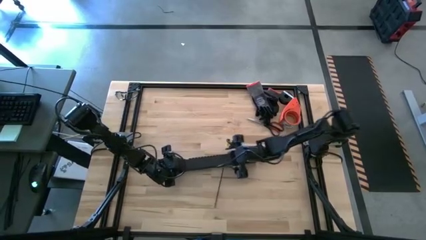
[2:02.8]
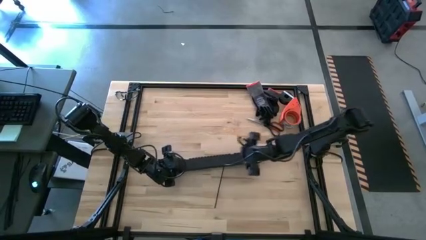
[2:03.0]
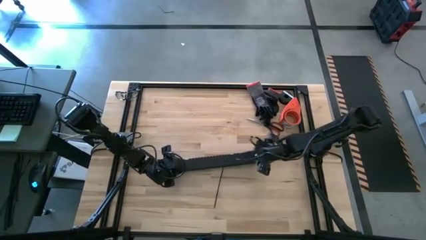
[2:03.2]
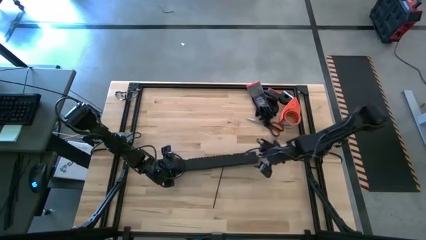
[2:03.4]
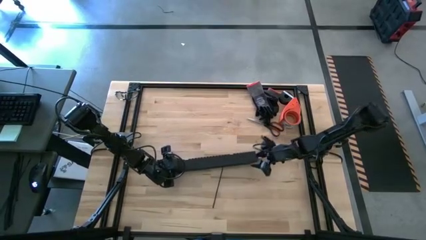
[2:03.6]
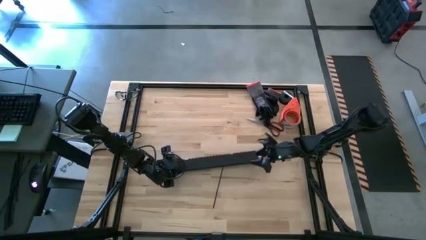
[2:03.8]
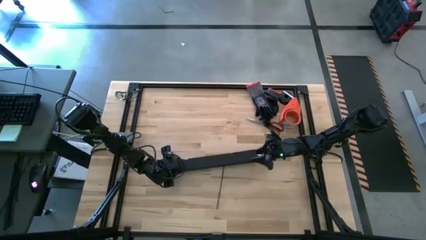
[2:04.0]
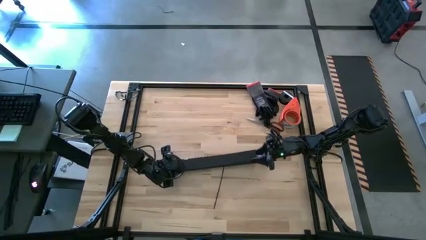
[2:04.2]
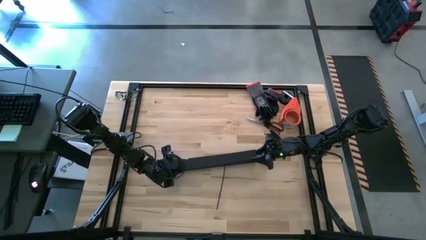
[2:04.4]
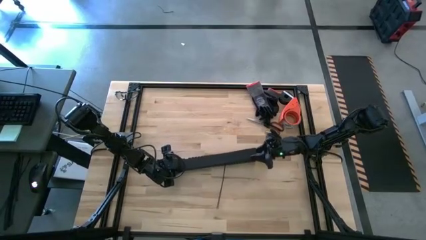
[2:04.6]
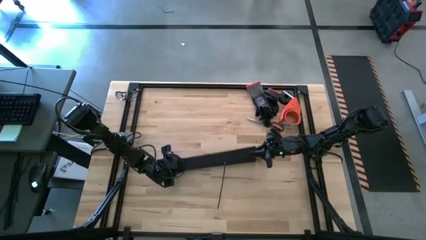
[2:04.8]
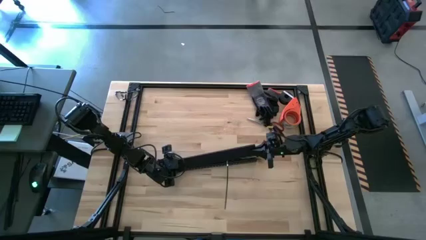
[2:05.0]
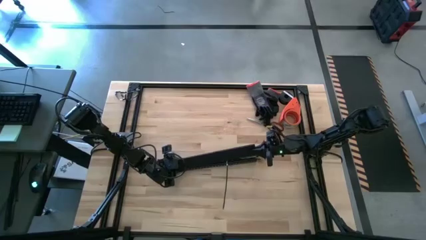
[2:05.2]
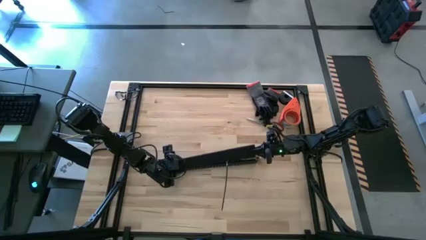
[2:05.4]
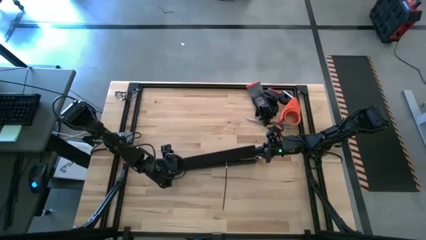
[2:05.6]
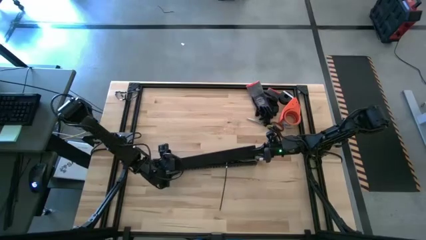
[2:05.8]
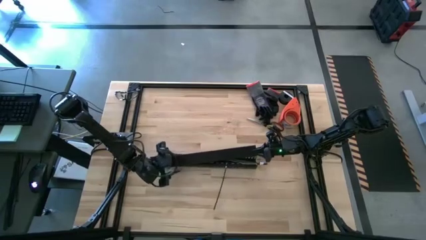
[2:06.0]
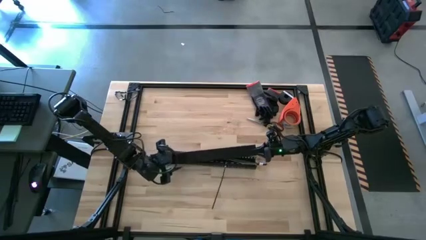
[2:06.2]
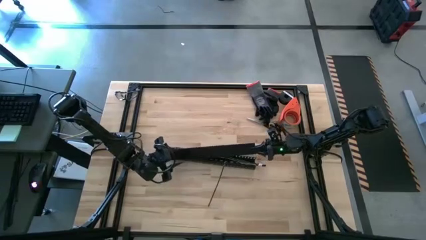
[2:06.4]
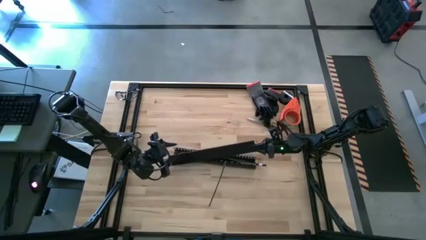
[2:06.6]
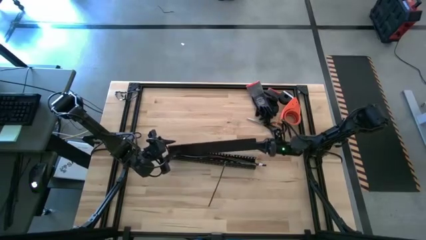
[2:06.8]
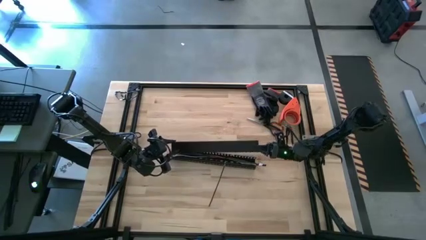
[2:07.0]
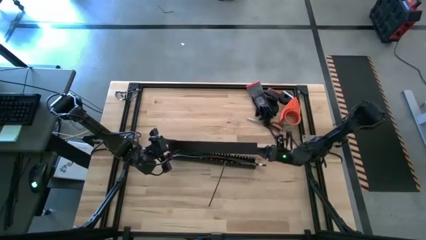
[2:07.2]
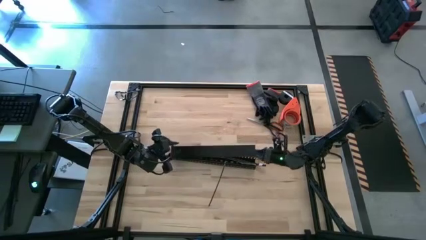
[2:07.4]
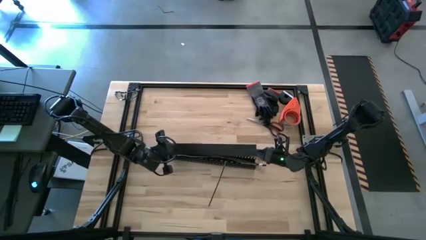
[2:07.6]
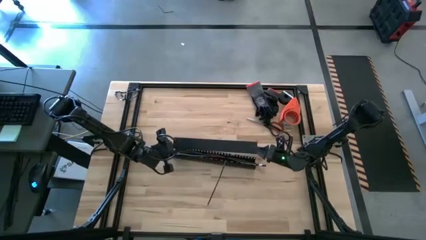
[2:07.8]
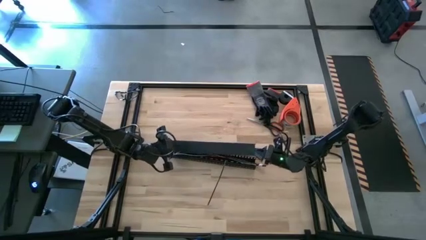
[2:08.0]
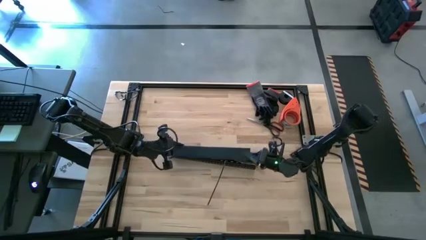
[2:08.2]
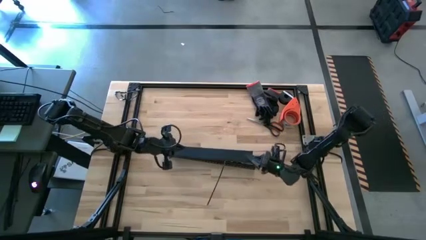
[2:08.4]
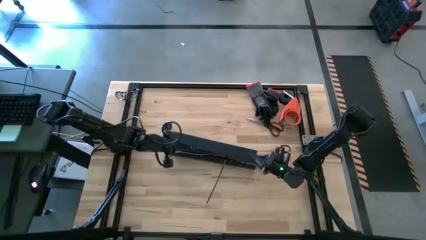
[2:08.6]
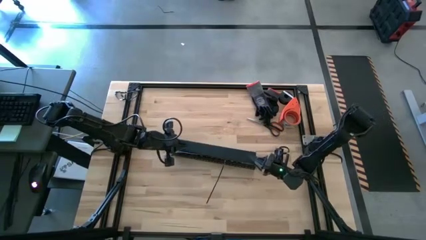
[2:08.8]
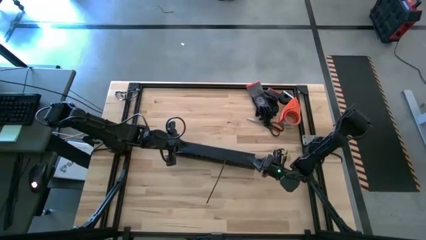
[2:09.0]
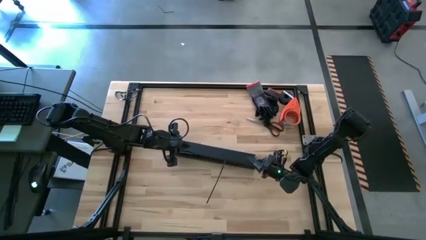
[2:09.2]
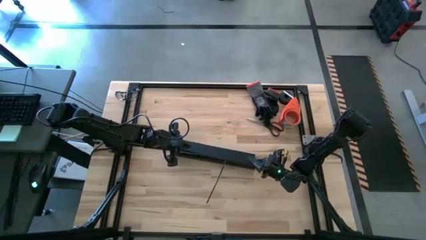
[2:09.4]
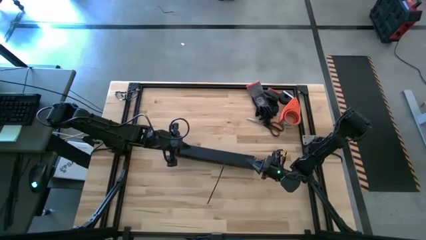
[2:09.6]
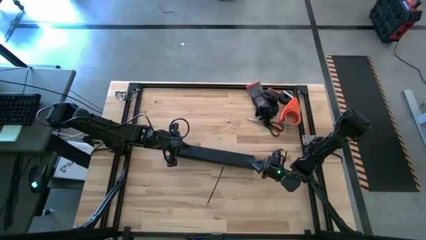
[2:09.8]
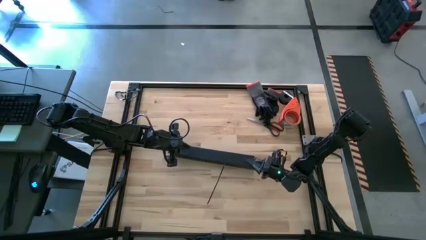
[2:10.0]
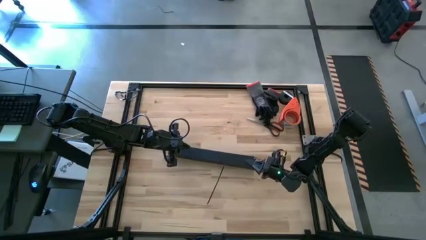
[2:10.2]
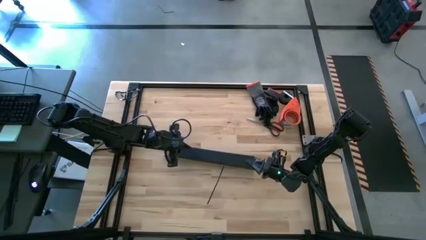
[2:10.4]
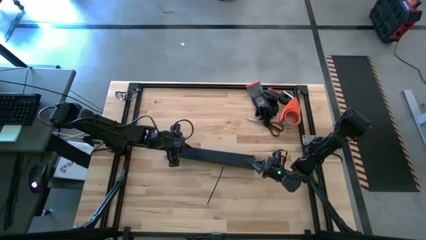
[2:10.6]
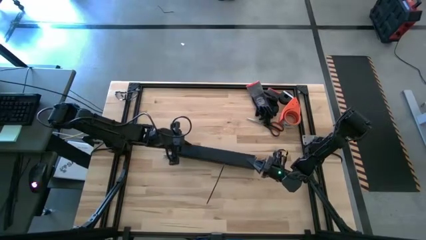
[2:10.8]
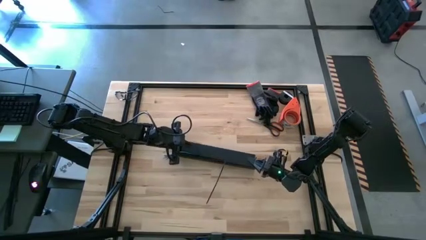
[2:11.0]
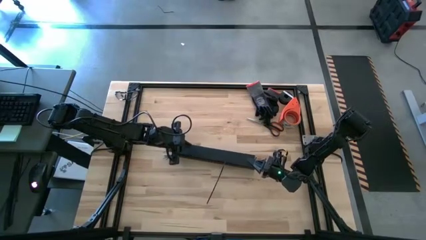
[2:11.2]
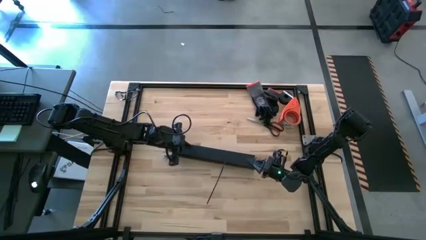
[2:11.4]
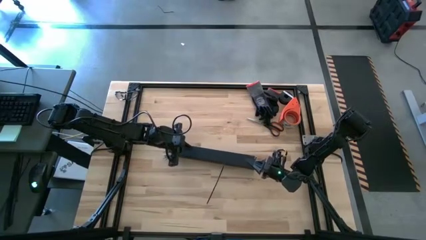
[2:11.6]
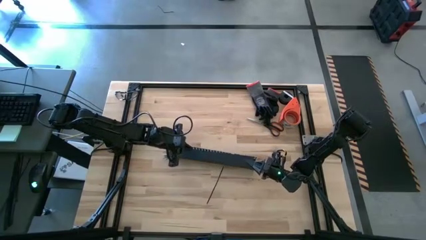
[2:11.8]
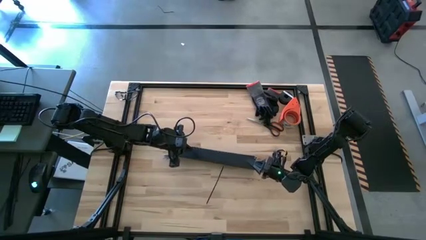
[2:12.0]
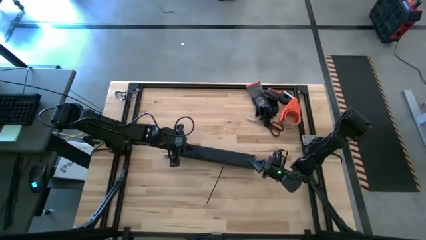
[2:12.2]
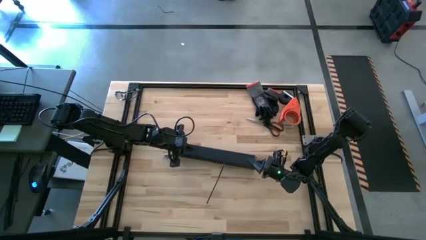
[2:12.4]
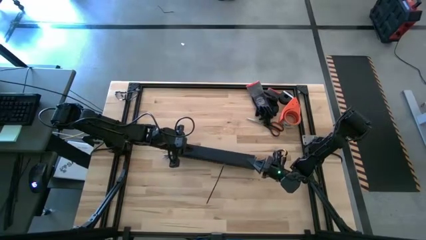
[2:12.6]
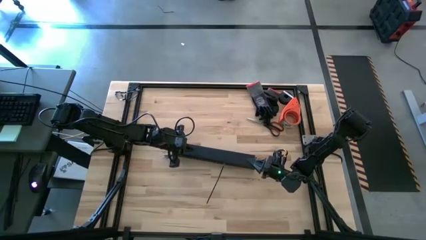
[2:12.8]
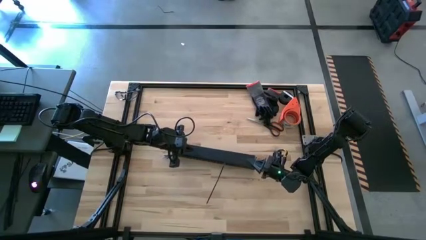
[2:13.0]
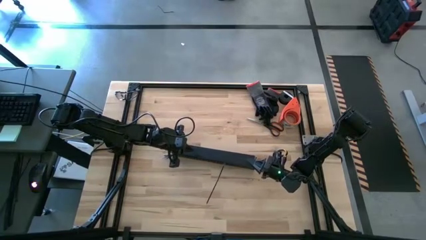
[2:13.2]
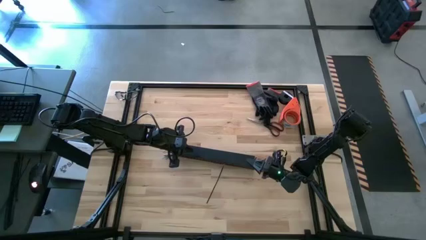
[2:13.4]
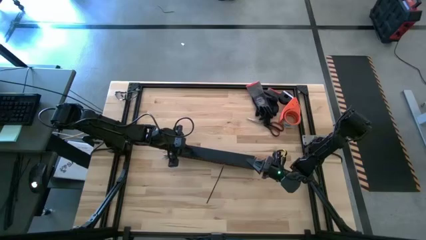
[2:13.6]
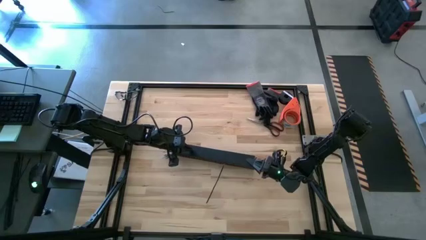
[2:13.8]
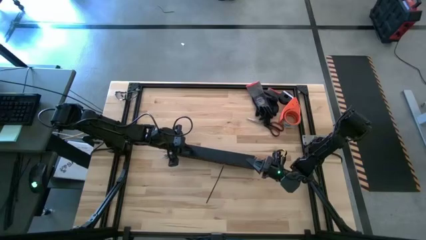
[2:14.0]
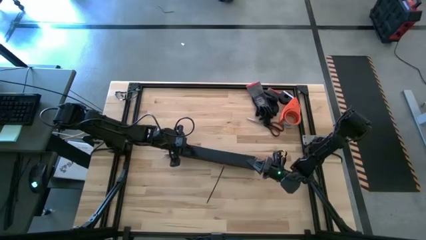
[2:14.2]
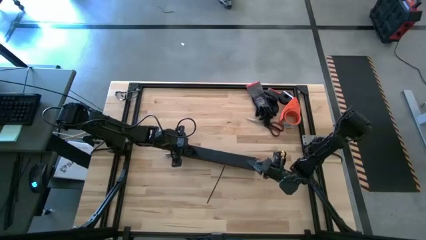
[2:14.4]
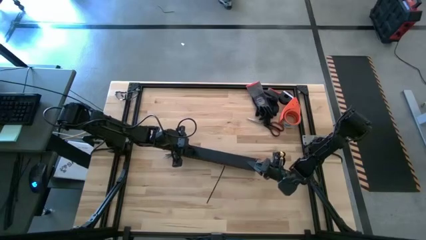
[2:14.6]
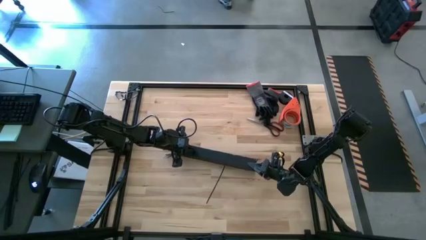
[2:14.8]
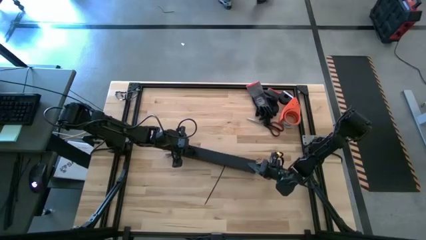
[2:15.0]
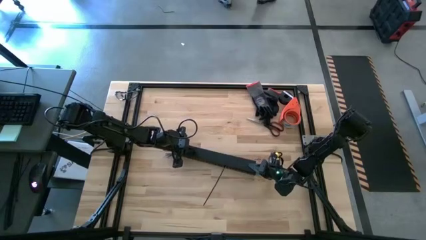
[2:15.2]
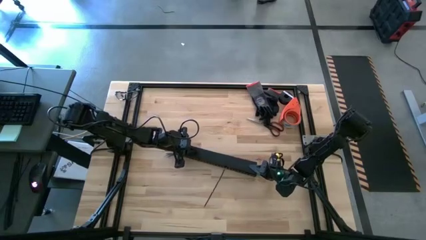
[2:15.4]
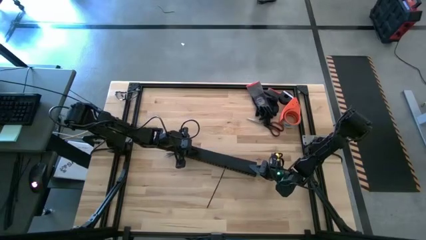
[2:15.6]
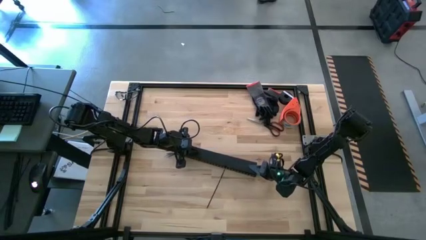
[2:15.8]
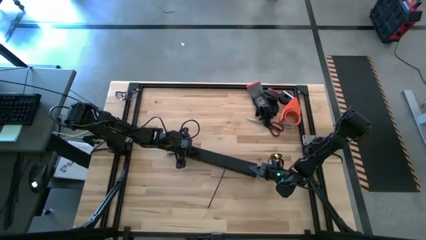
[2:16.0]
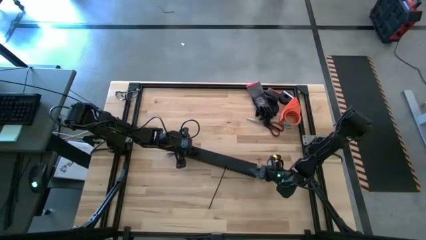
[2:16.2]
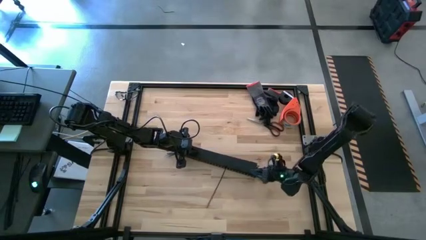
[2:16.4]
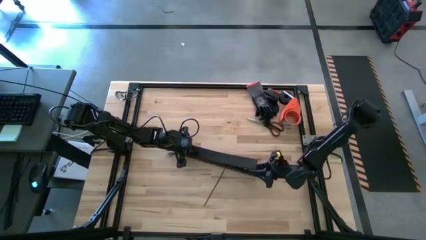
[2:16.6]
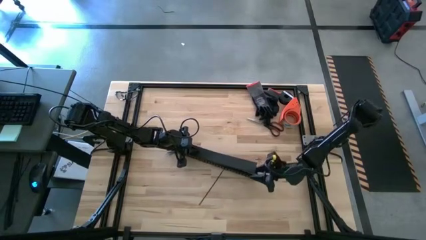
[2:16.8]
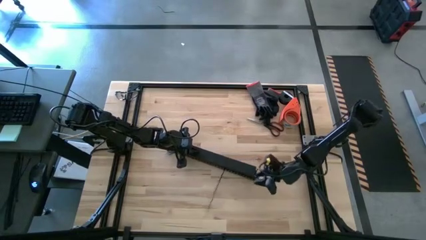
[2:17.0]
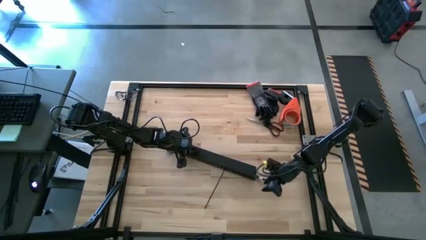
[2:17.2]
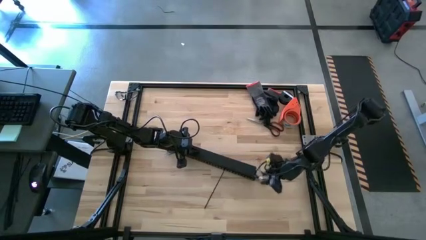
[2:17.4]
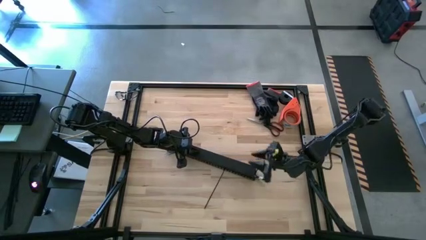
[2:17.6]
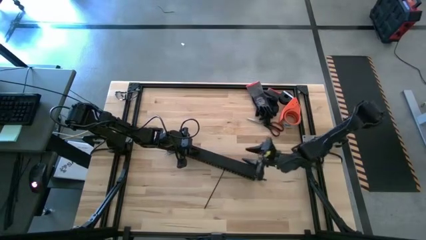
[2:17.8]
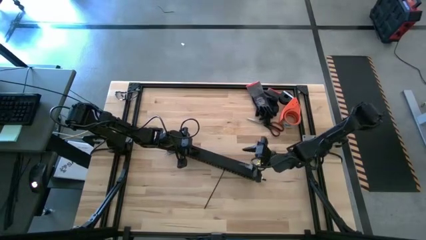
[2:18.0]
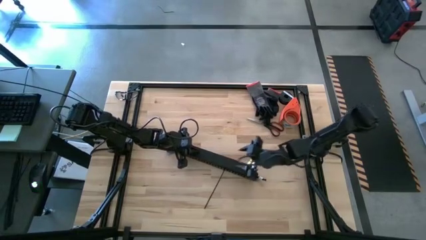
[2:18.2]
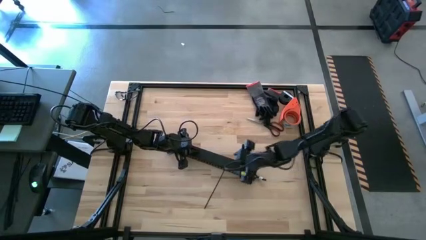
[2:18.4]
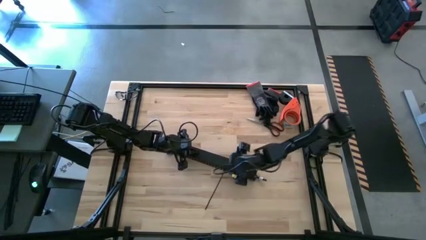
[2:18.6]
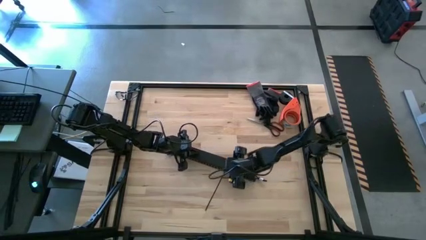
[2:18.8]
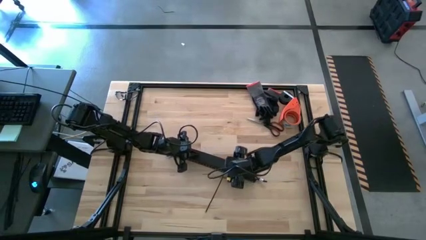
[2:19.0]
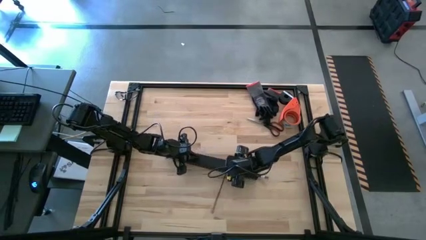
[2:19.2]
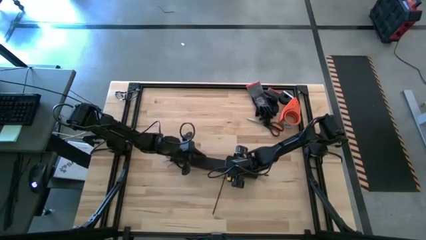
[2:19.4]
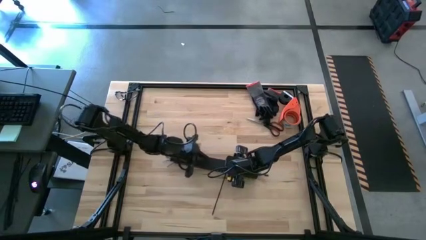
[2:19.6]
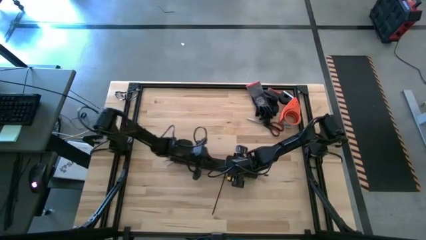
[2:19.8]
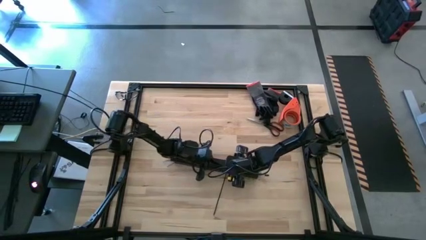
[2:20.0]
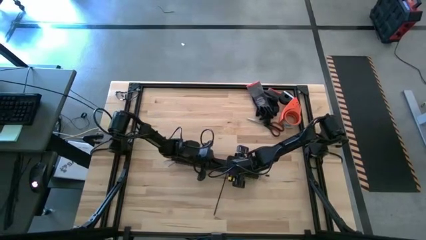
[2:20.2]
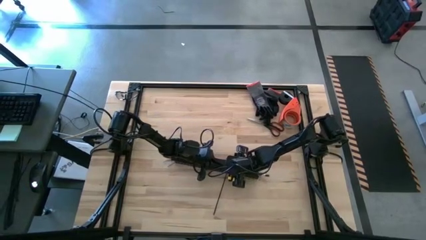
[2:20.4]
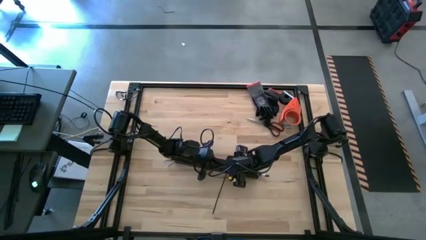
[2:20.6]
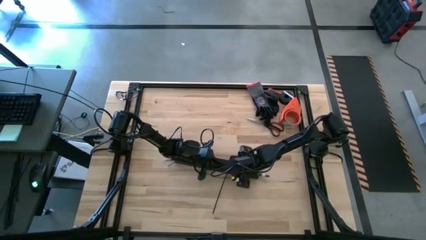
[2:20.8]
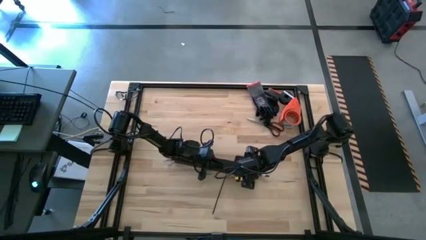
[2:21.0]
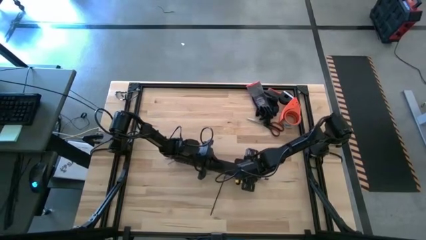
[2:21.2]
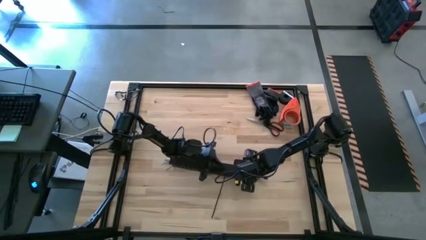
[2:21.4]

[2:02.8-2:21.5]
Task: Ziptie cables
Close the black cable duct
